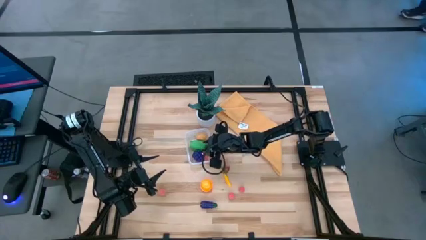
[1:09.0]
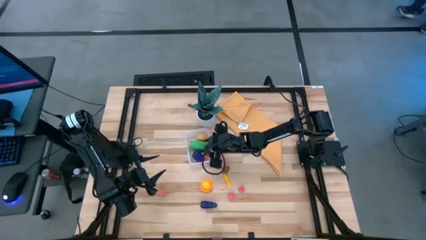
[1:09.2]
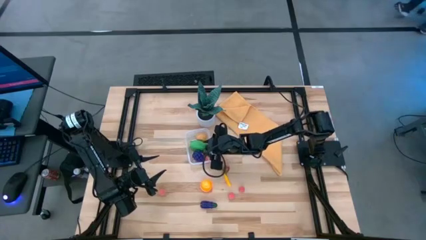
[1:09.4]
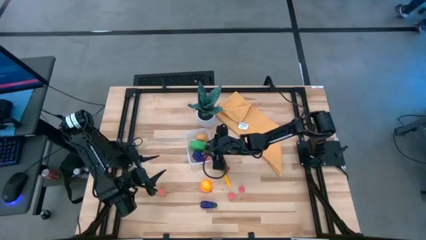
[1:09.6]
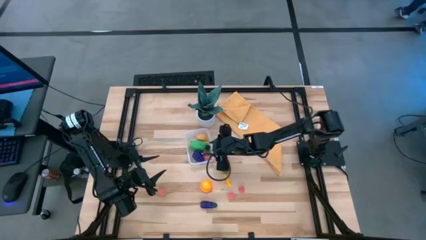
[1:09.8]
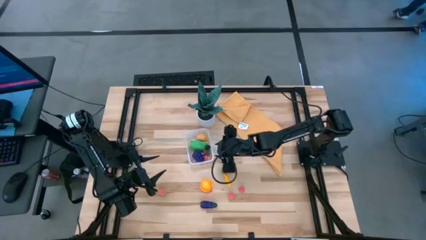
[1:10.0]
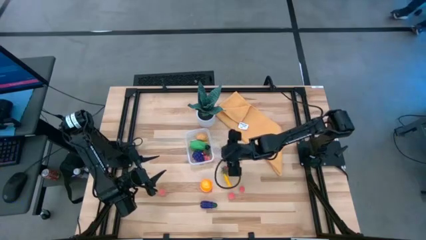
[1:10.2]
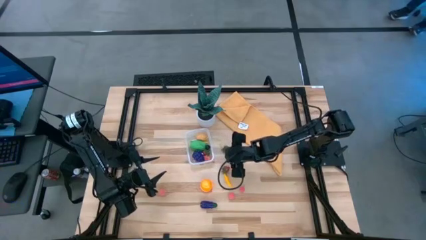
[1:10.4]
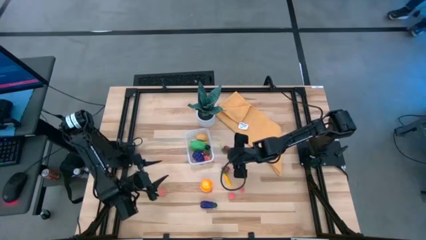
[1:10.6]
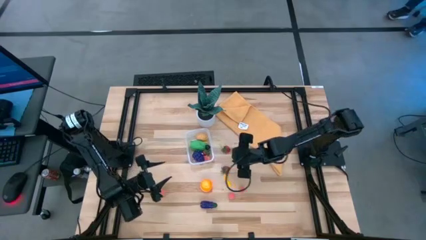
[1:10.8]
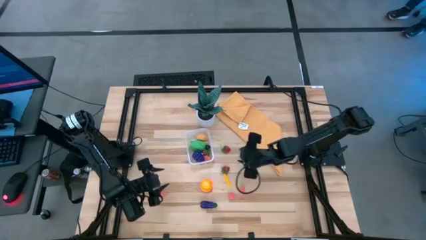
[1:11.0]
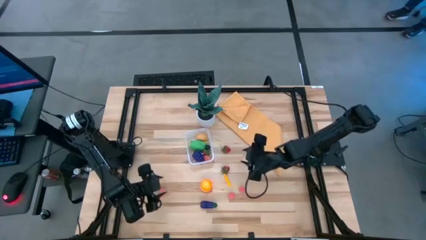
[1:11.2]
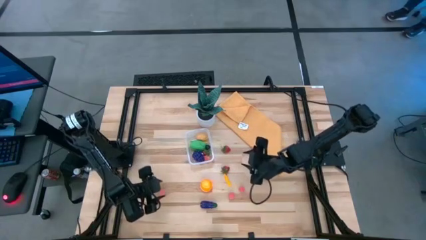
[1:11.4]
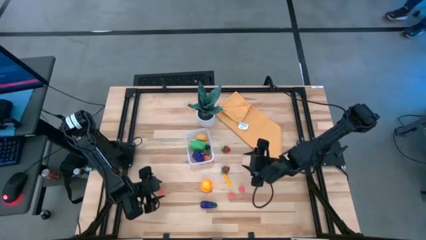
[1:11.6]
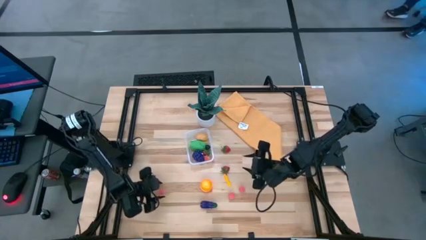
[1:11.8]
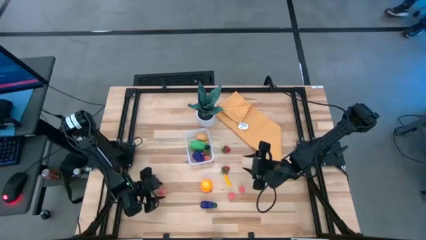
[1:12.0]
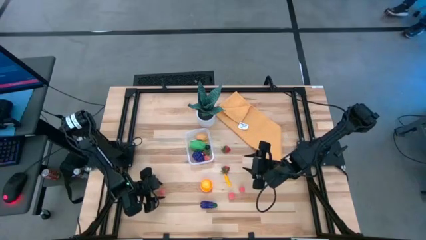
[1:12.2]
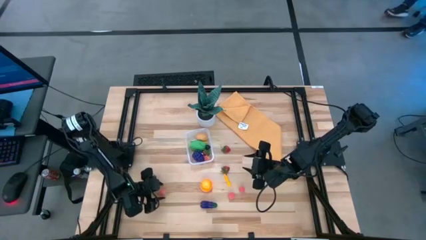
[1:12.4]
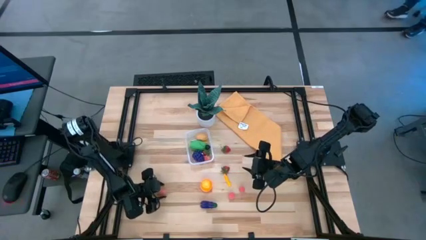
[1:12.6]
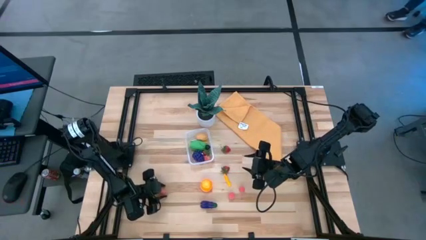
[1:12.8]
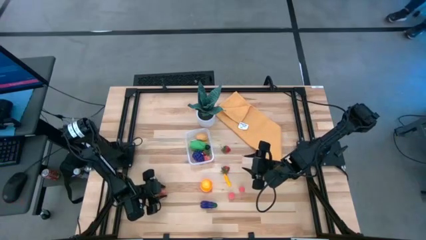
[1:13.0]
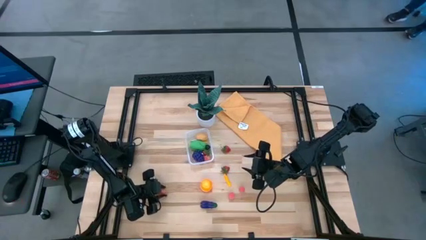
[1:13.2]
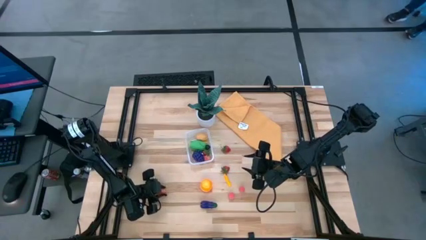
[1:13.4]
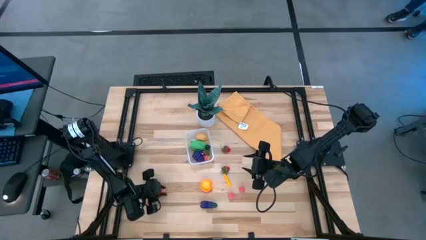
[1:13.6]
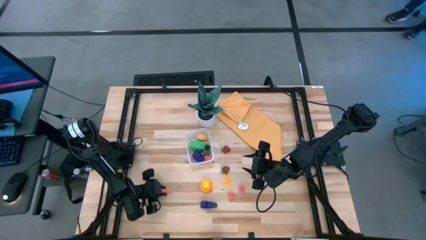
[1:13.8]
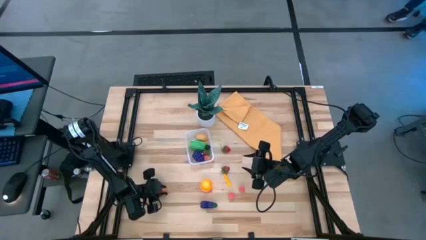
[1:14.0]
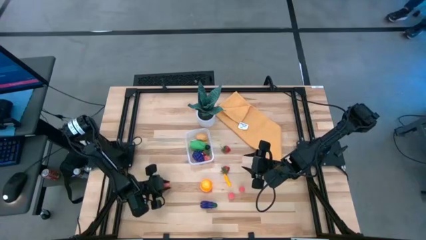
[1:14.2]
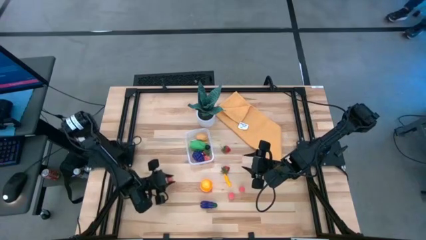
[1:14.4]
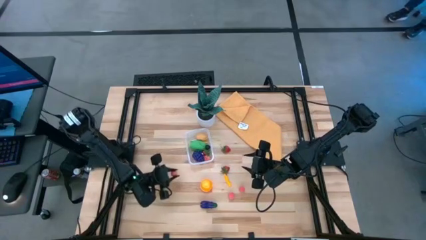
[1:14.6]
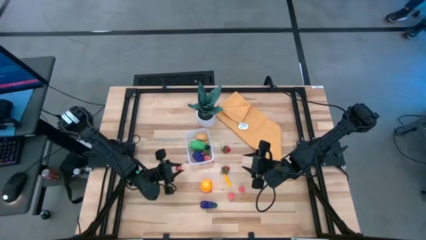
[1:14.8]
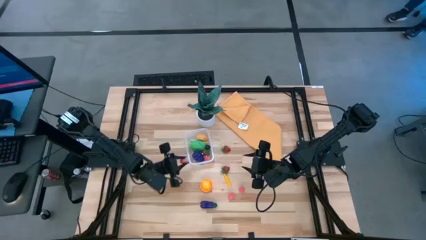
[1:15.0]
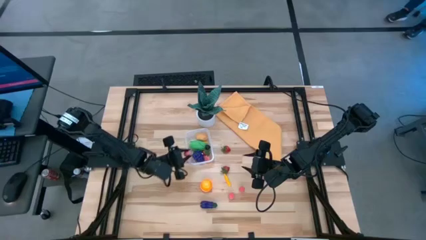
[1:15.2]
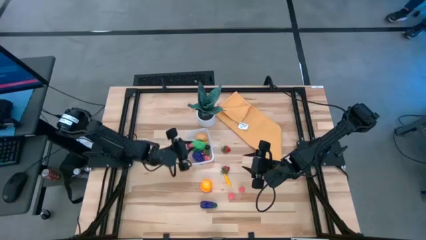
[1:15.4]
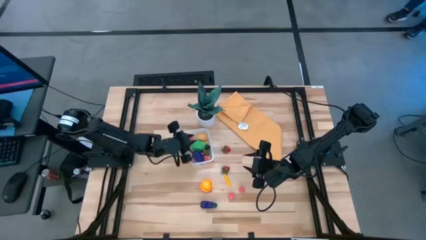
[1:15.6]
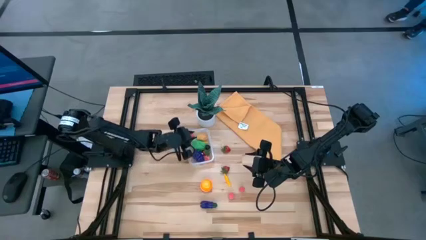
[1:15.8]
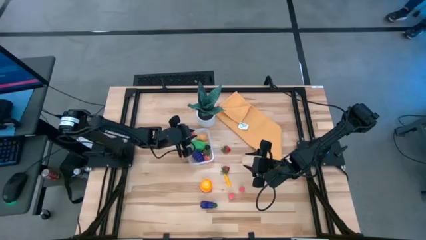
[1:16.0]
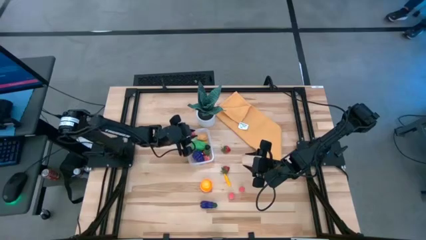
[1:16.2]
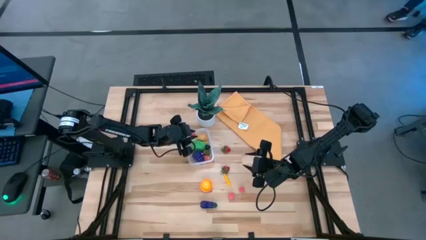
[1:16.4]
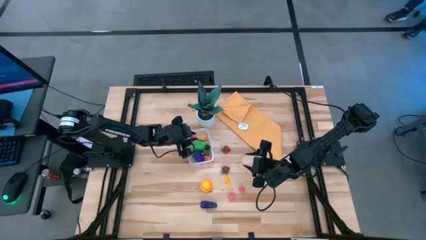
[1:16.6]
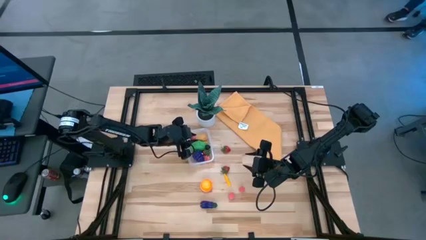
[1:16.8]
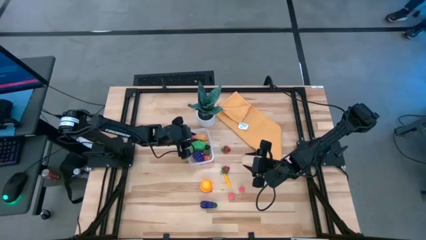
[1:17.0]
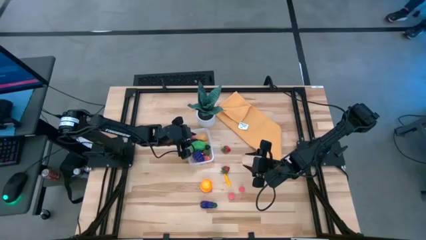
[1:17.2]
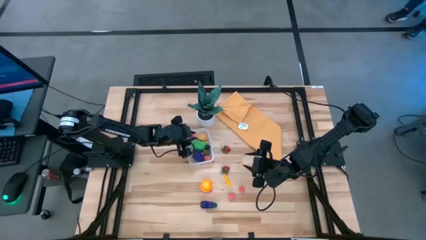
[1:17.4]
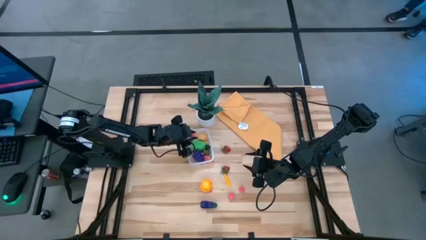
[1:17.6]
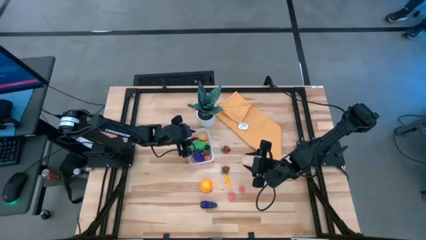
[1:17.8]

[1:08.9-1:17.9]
Task: Pick and placing Produce into tupperware
Put the left peach into the transparent bin

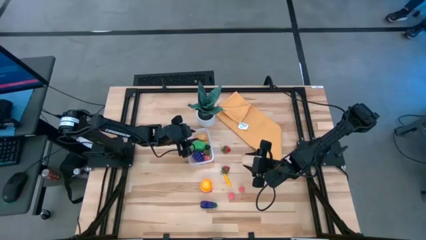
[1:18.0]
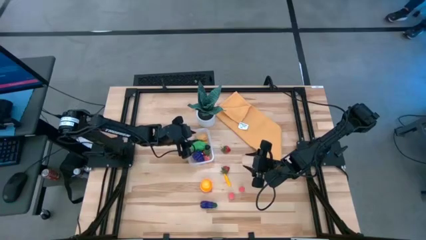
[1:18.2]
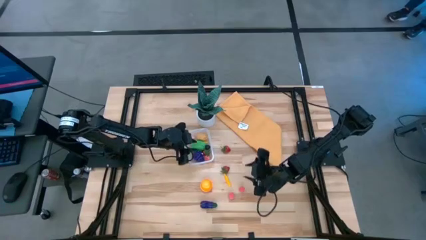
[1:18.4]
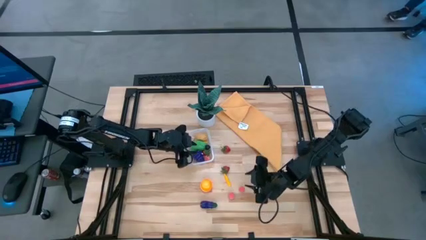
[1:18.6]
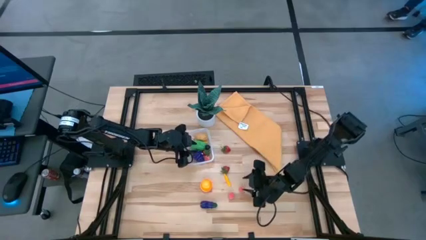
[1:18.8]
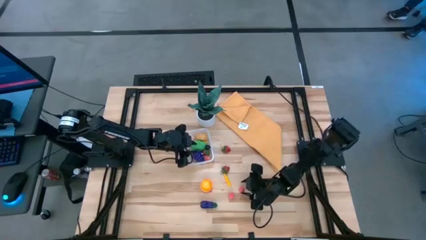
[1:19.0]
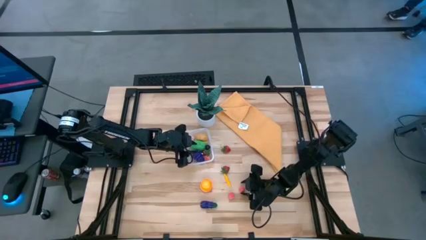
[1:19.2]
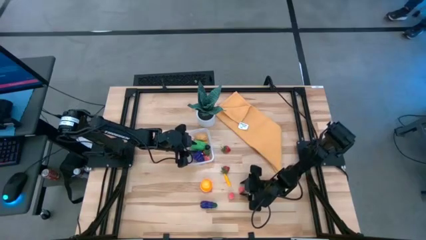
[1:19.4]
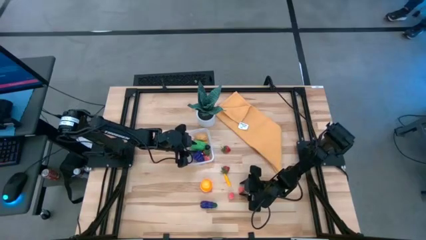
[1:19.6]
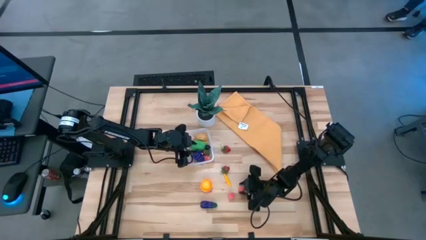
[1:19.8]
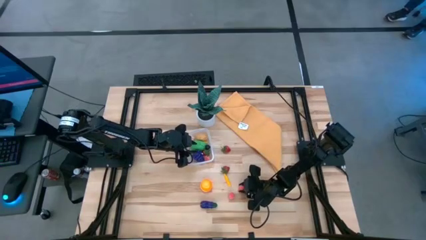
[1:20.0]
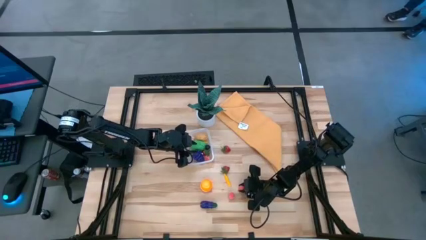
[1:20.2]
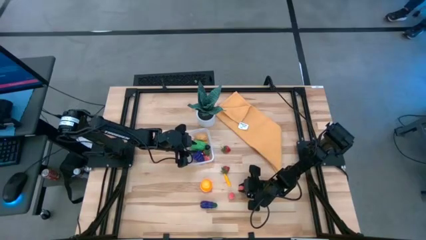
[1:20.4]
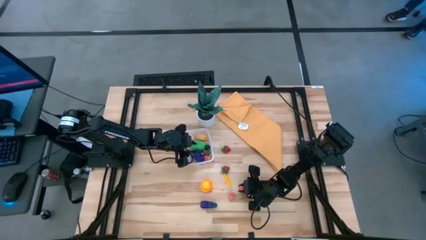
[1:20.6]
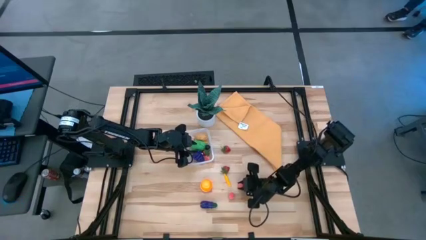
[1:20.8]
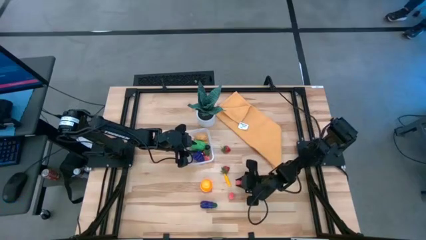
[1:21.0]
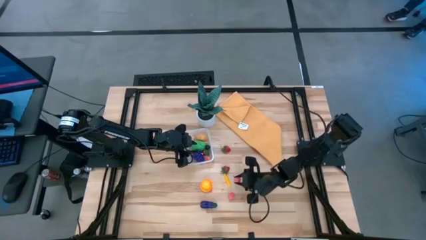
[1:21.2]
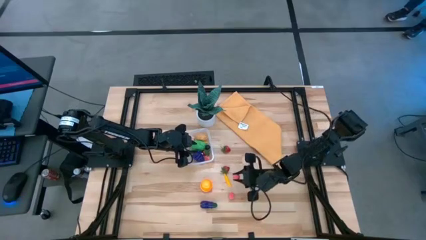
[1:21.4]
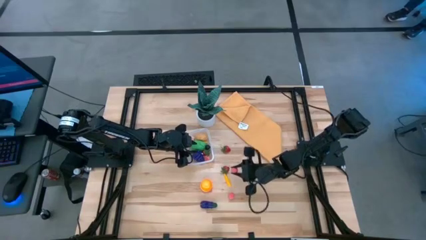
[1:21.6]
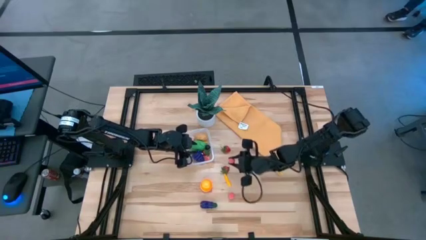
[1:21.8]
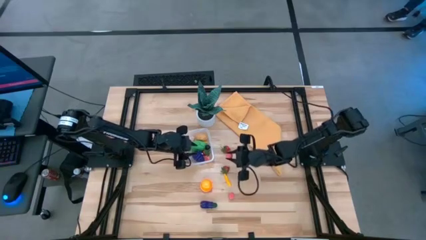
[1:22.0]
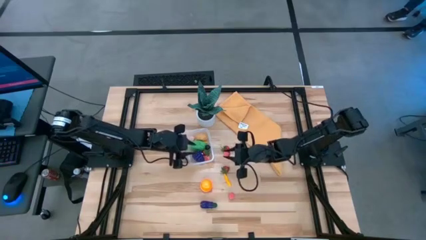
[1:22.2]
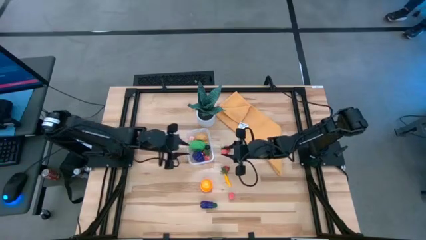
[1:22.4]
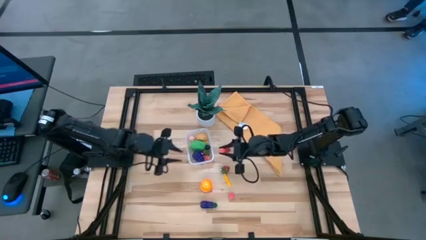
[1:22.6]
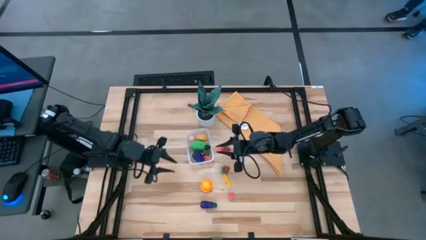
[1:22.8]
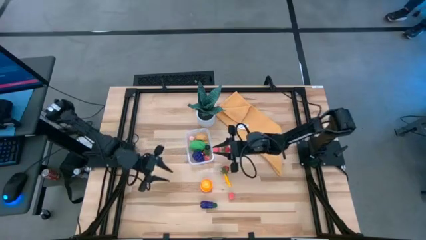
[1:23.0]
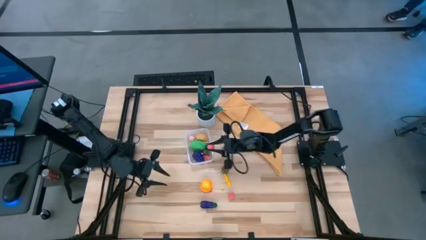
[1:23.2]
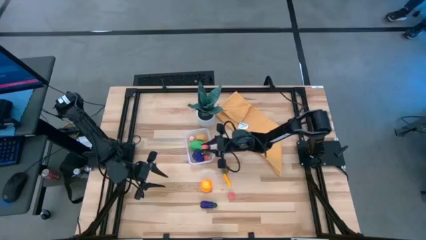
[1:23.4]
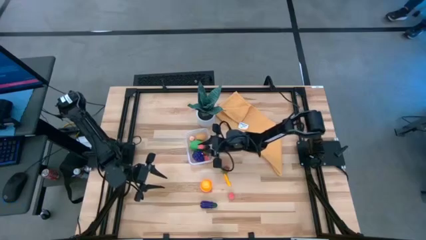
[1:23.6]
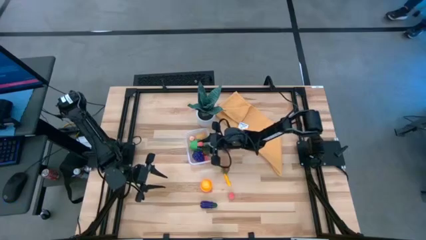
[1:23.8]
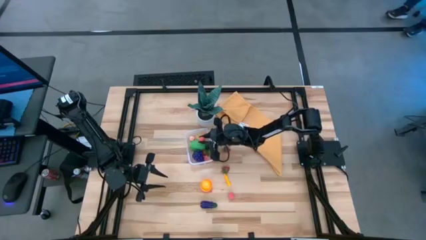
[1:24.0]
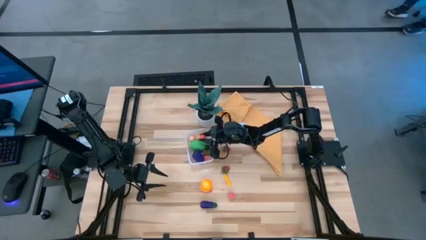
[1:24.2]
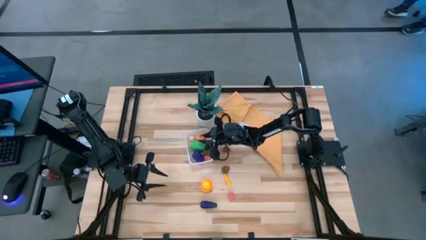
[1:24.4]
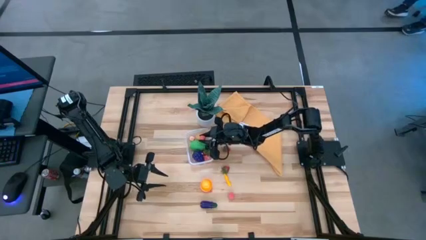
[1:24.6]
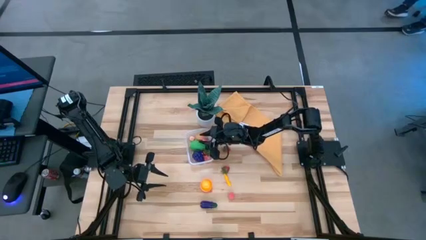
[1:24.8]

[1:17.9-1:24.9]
Put the right peach into the transparent bin

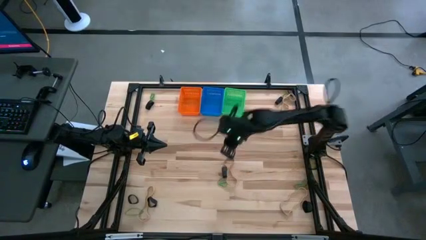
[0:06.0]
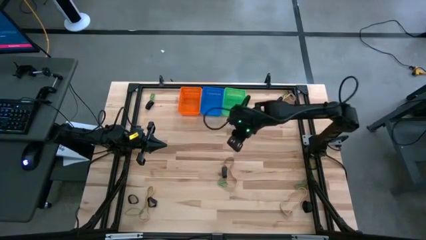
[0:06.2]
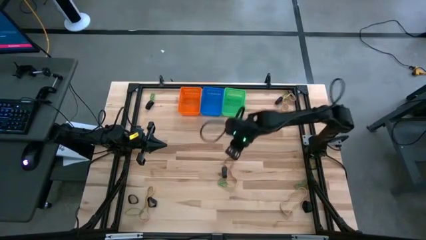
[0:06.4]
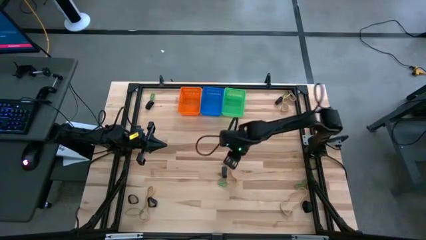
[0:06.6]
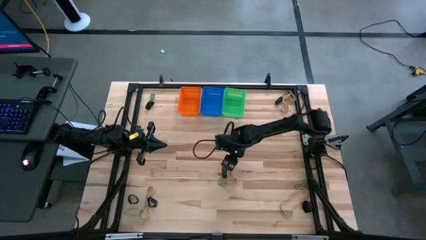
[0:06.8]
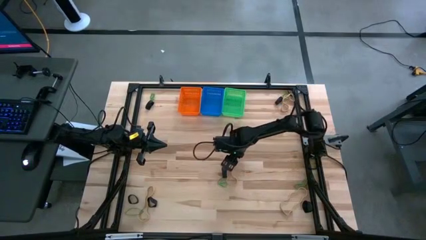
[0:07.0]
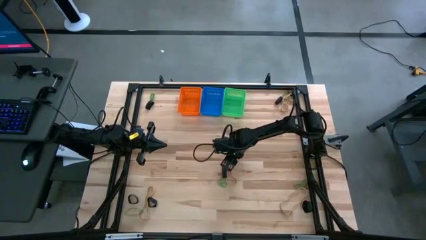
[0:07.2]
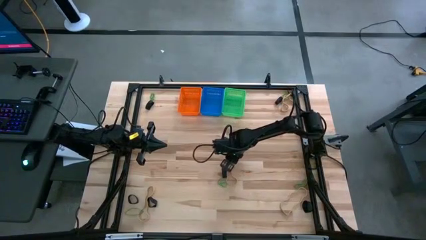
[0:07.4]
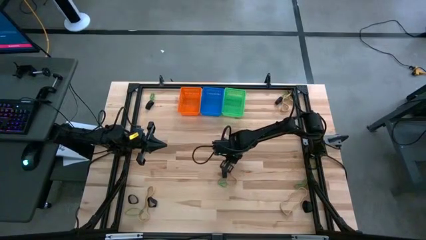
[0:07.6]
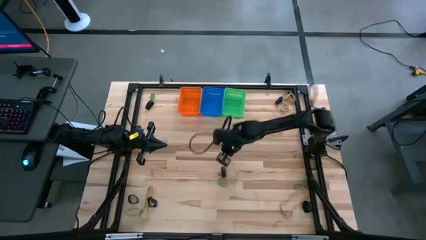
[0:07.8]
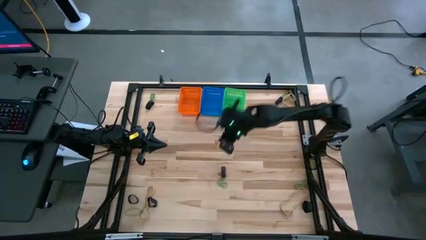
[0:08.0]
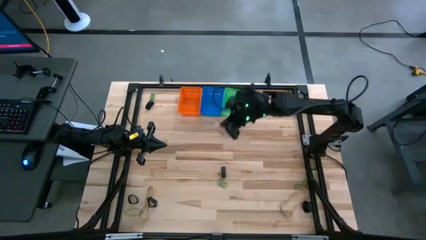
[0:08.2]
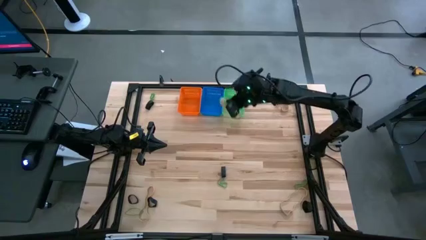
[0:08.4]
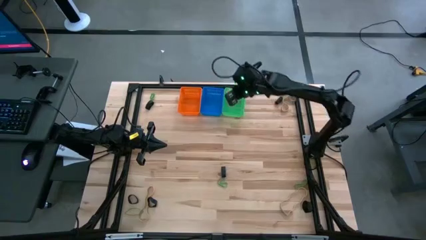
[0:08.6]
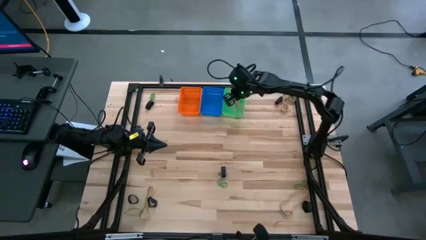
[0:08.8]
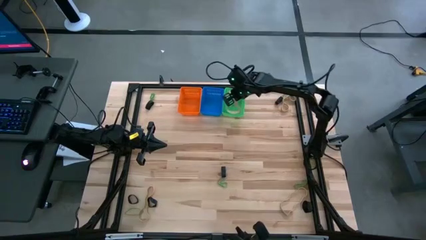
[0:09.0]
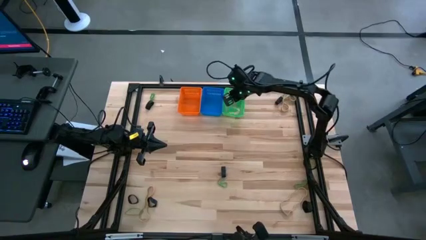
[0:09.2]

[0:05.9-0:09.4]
Task: Sort rubber bands into baskets
Put the brown rubber band into the green bin
